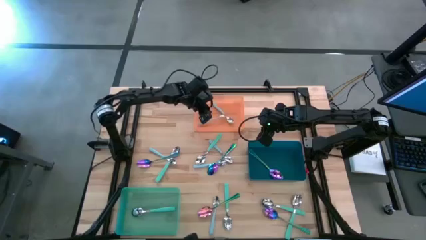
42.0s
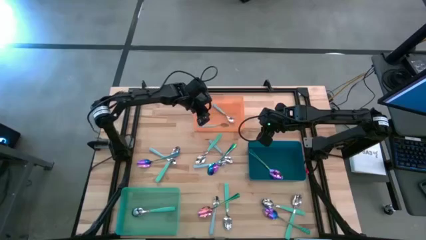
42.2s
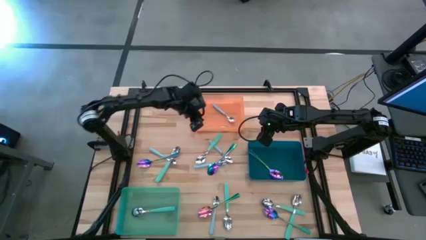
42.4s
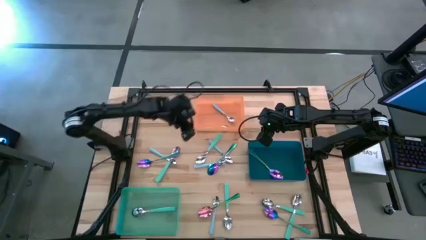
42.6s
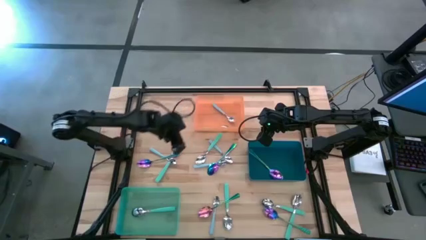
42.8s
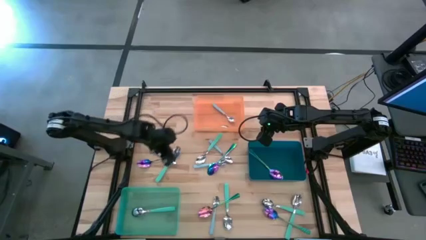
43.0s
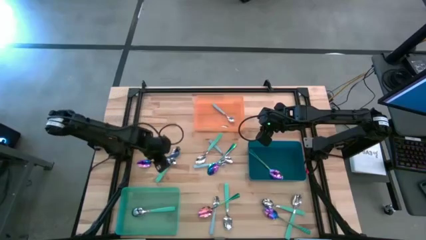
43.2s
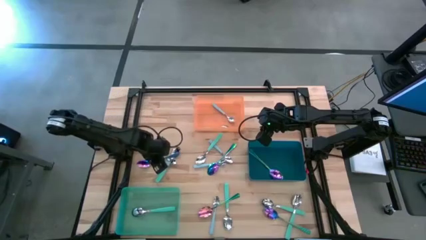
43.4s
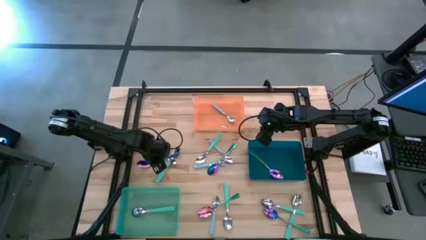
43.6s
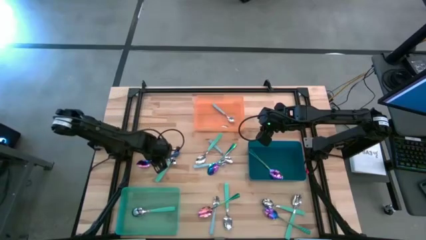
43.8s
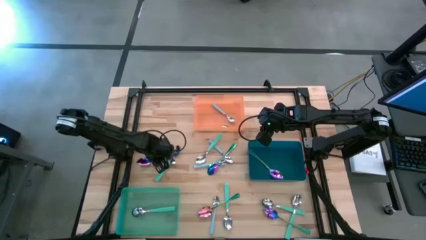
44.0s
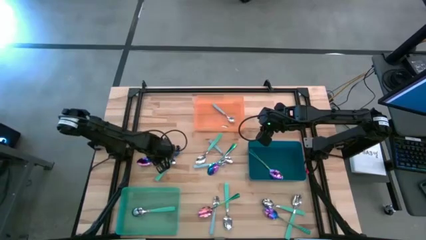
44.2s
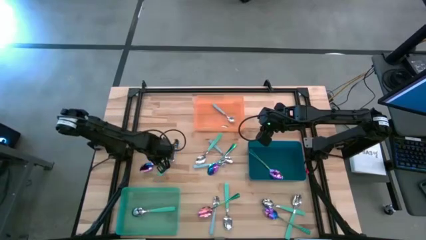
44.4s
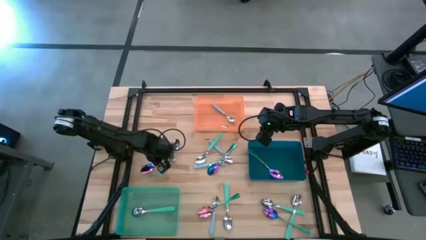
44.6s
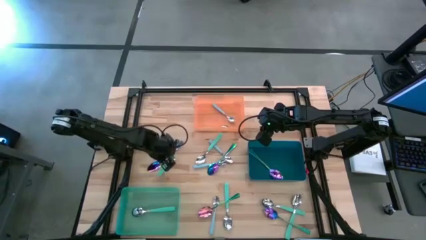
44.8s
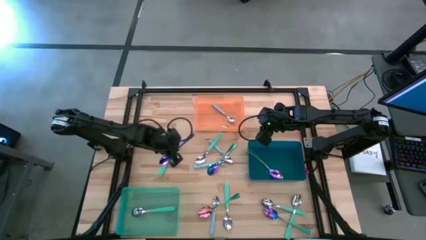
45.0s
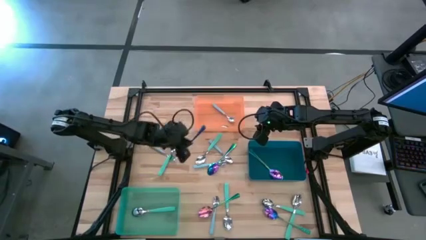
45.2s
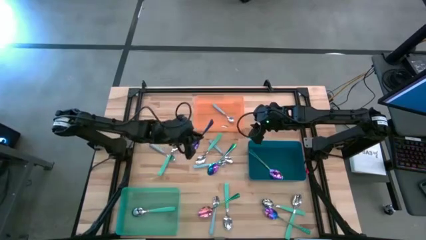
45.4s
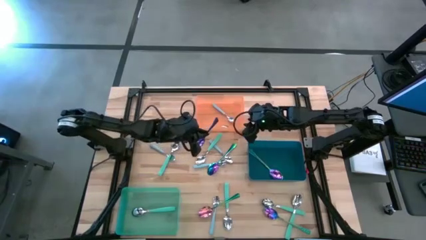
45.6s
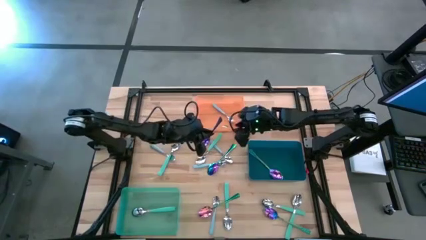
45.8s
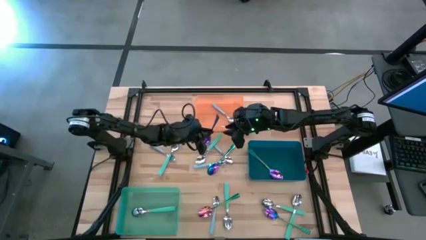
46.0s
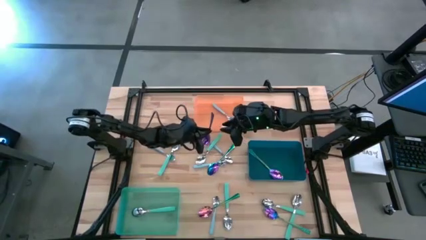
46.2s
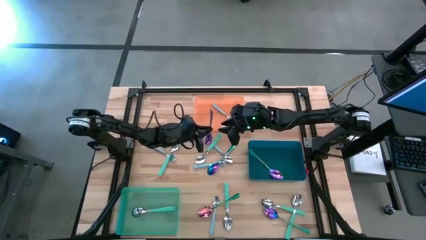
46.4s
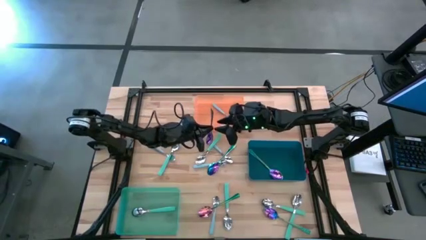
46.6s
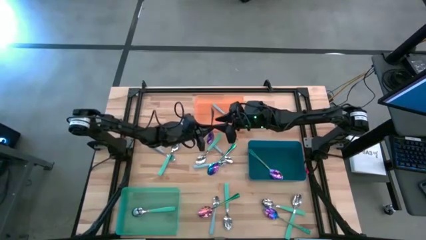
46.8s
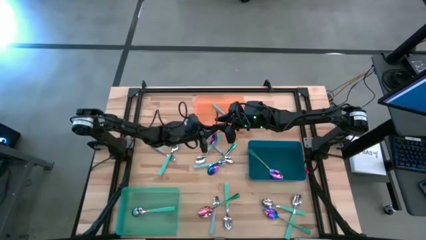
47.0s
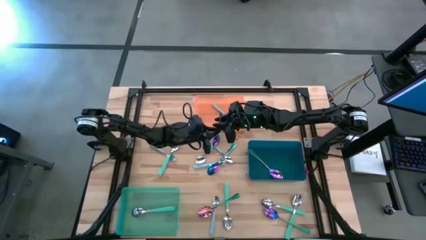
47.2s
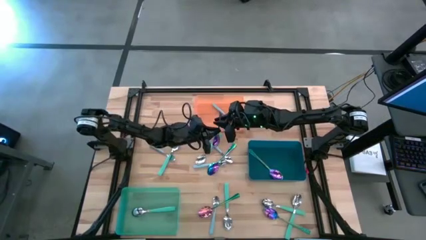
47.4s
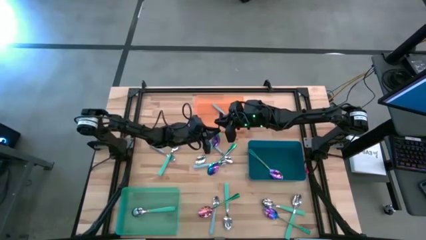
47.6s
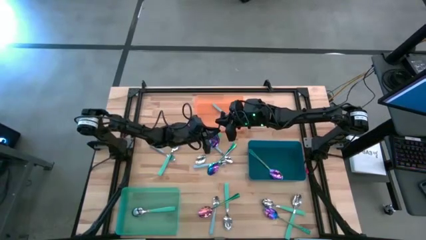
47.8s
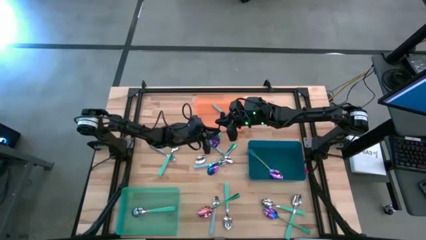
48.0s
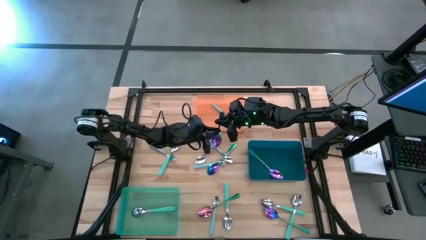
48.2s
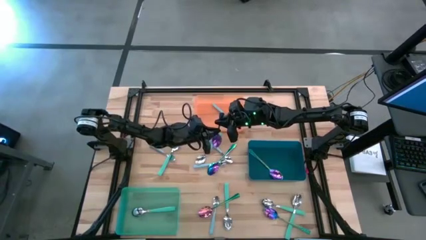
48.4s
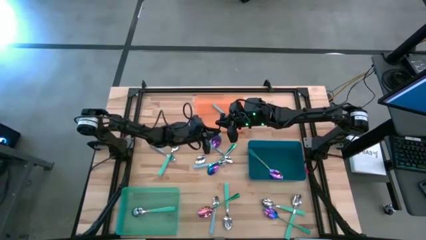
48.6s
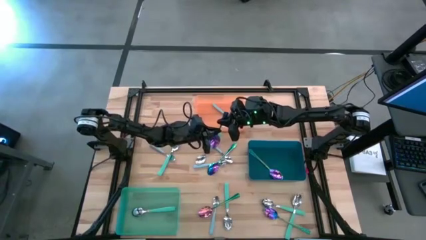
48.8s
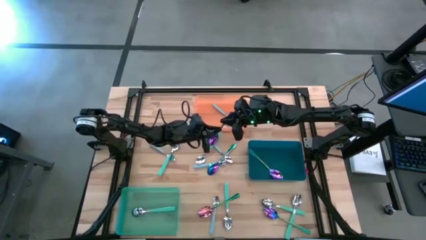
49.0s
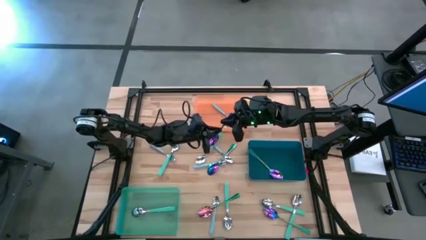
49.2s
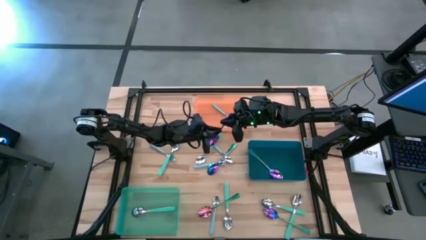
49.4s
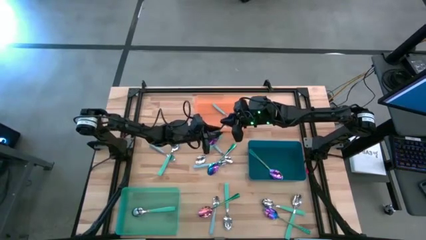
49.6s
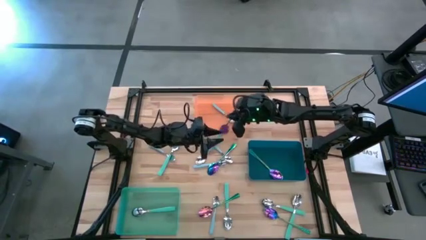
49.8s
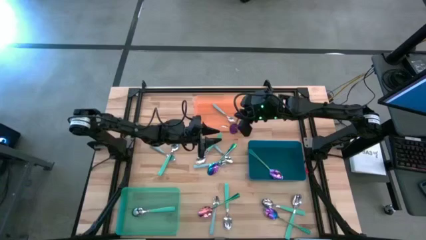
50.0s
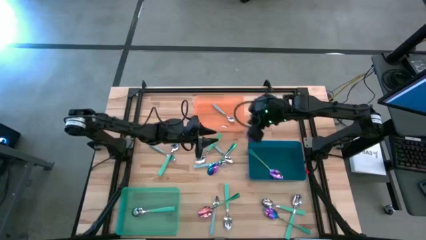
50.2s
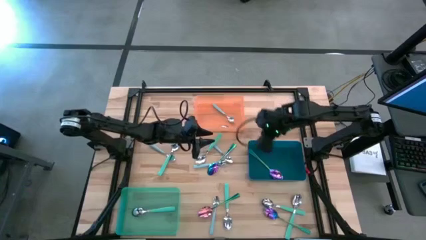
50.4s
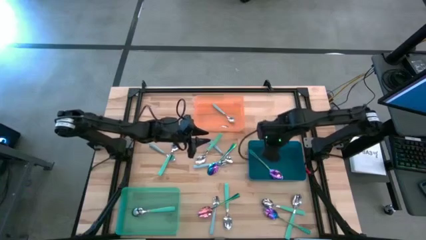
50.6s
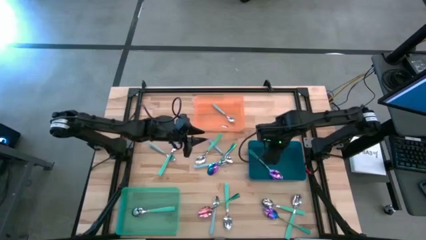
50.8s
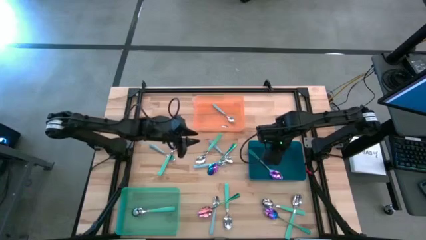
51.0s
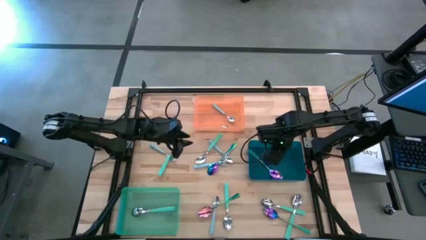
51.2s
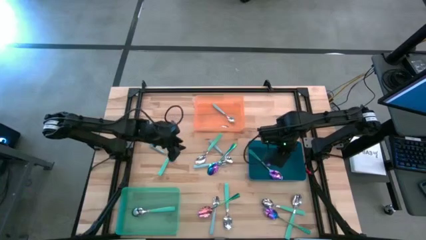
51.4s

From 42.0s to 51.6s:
Task: Sort silverware by color (type)
Put the purple spoon into the blue bin

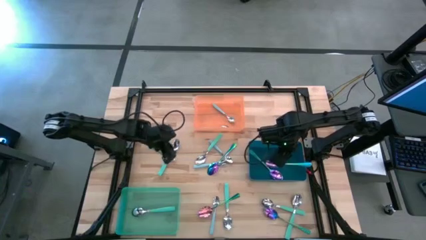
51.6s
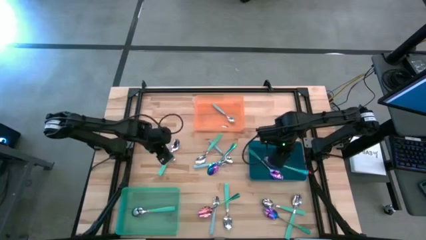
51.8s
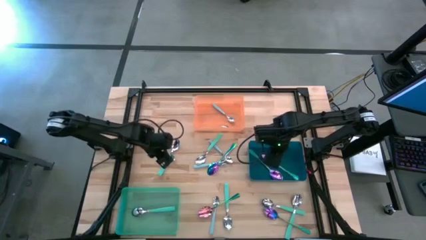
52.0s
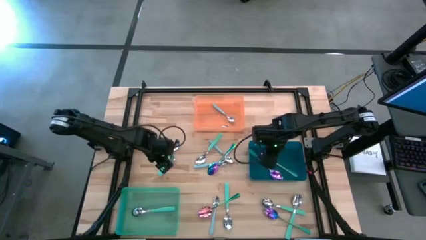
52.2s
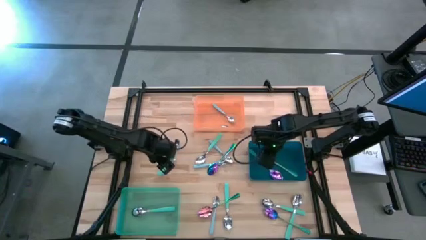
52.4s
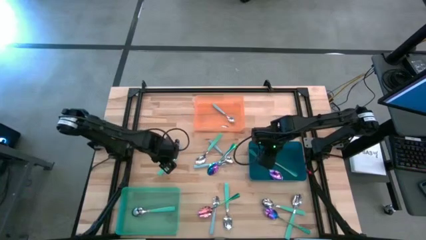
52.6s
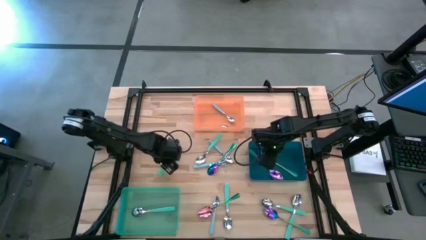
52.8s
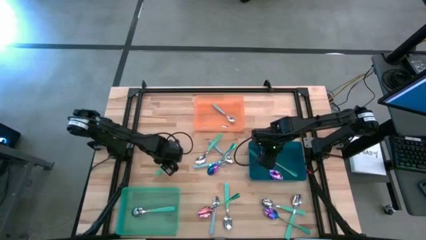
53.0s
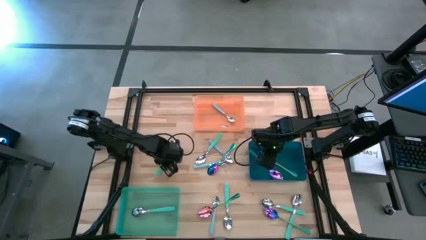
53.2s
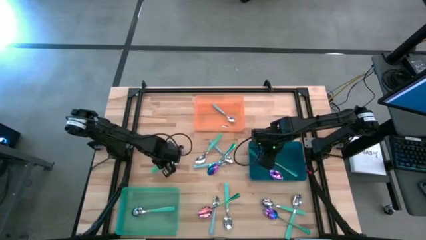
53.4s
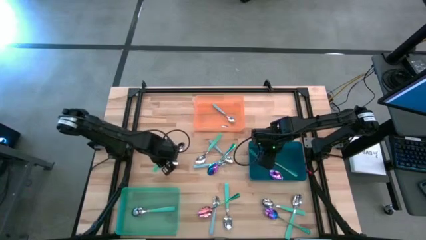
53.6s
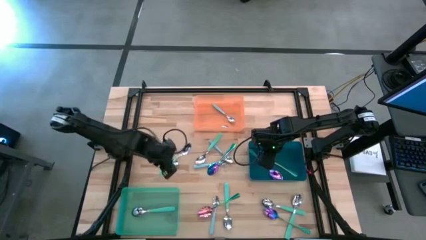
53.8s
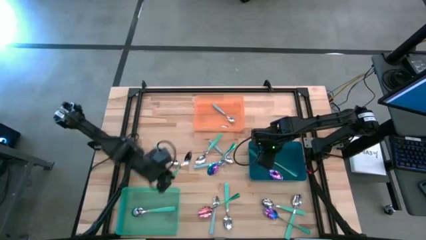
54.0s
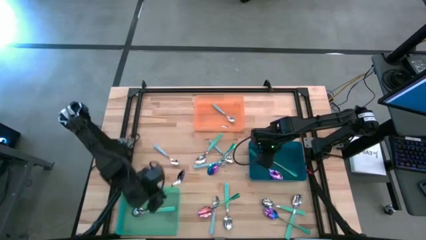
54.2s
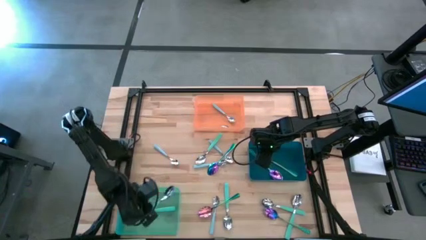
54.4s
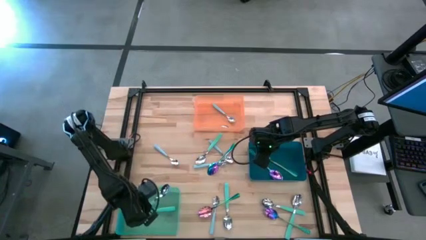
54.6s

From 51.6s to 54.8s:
Put the green spoon into the green bin
